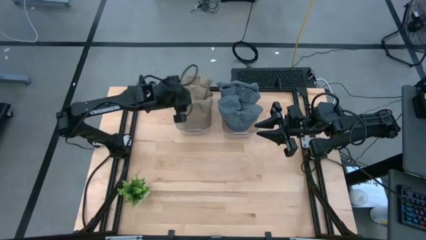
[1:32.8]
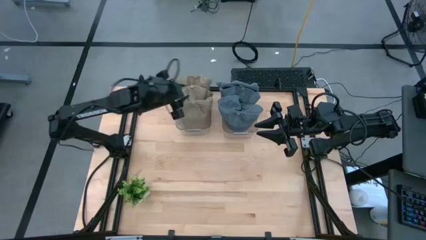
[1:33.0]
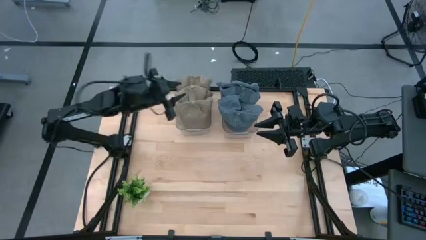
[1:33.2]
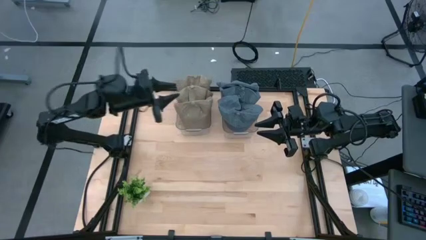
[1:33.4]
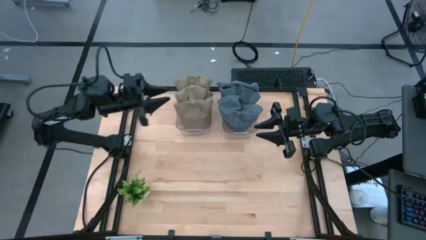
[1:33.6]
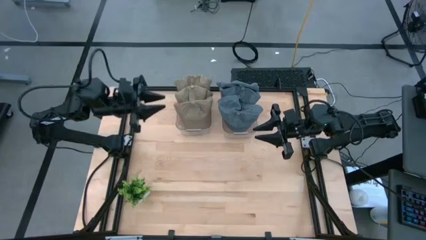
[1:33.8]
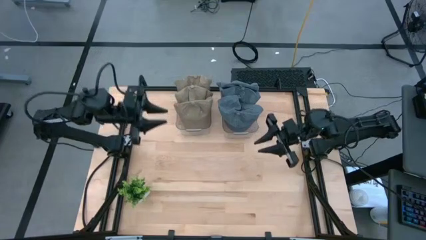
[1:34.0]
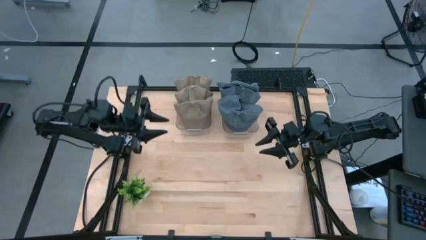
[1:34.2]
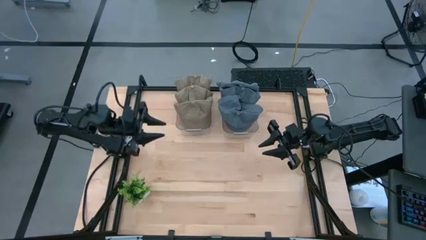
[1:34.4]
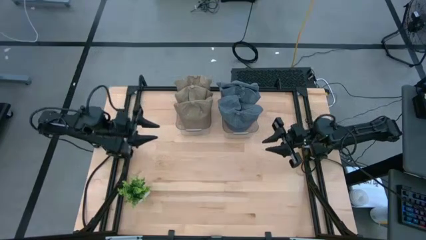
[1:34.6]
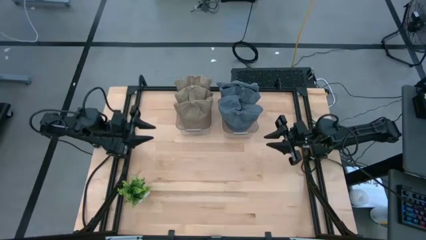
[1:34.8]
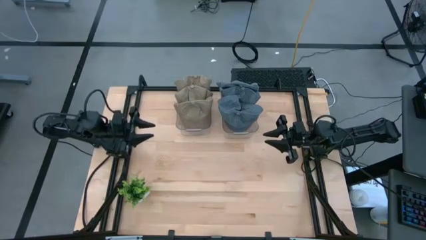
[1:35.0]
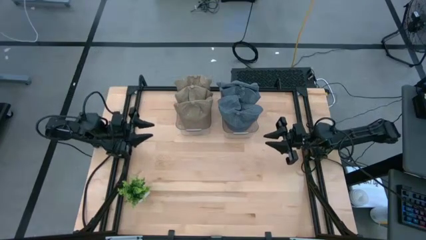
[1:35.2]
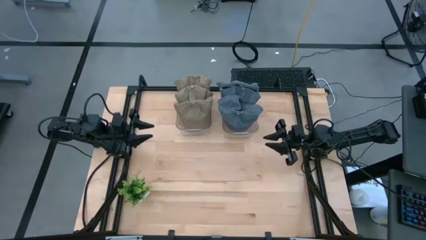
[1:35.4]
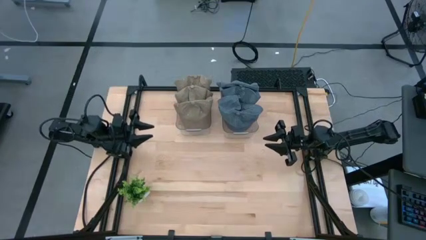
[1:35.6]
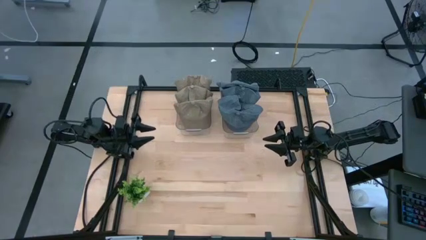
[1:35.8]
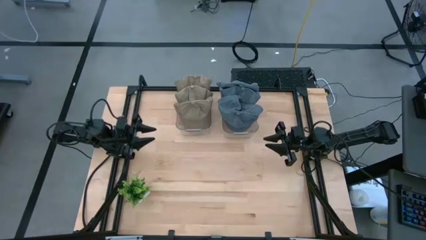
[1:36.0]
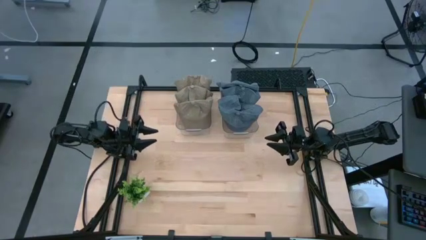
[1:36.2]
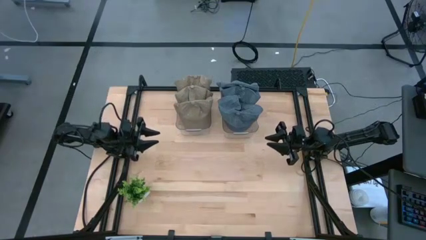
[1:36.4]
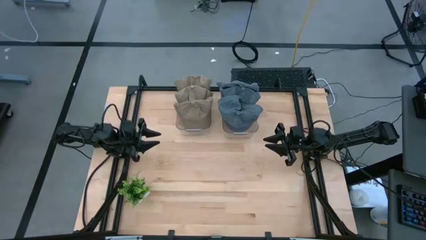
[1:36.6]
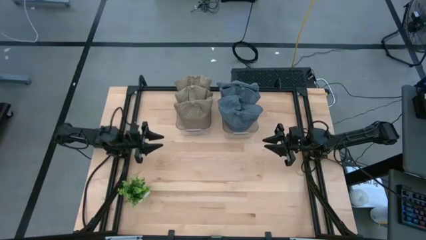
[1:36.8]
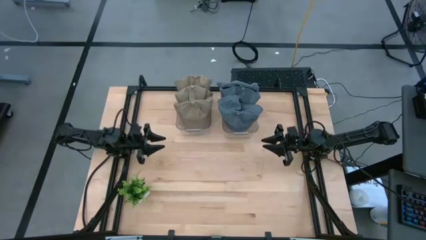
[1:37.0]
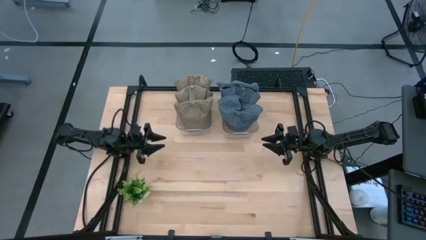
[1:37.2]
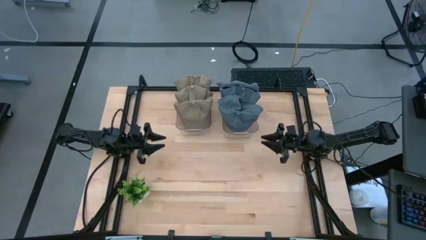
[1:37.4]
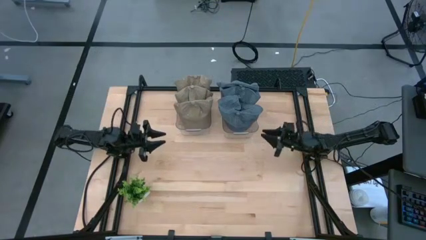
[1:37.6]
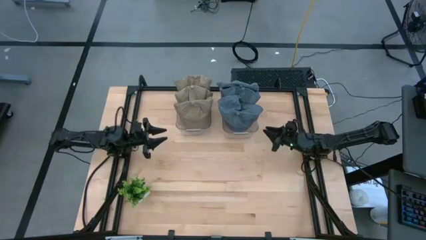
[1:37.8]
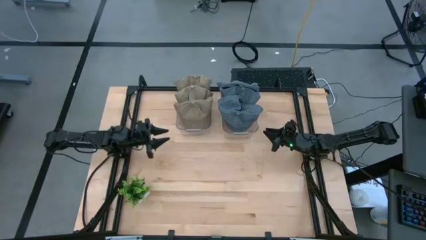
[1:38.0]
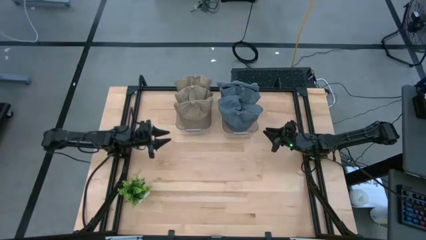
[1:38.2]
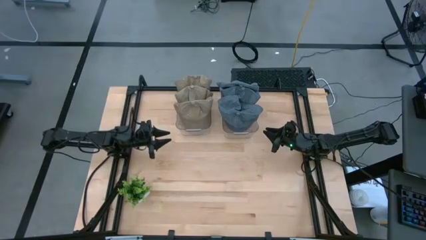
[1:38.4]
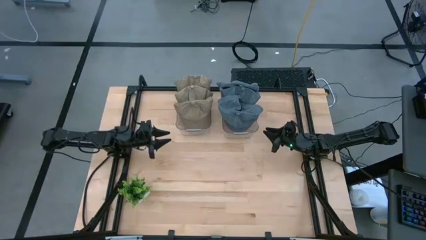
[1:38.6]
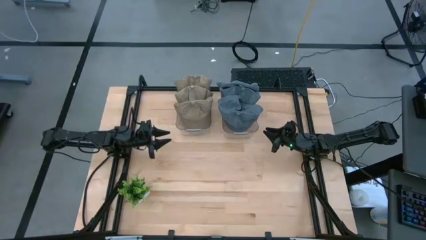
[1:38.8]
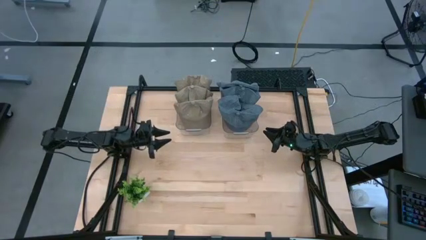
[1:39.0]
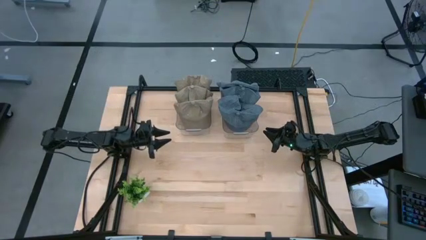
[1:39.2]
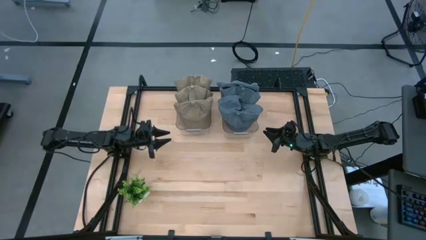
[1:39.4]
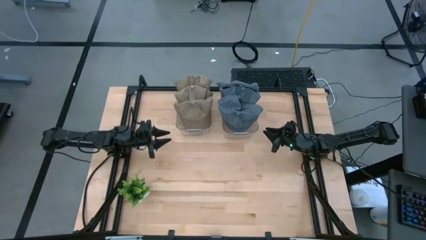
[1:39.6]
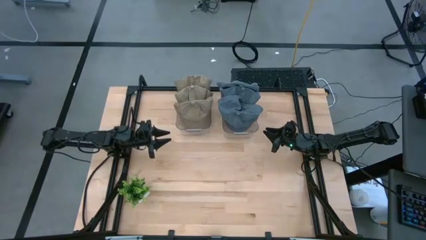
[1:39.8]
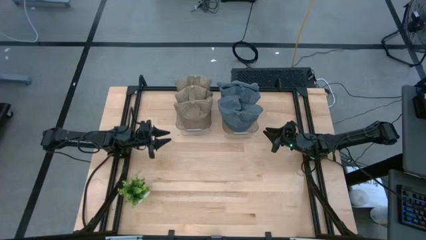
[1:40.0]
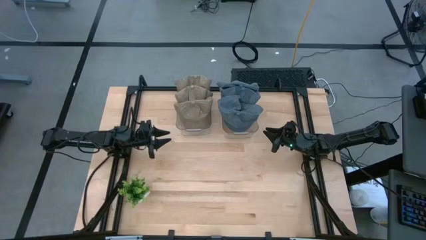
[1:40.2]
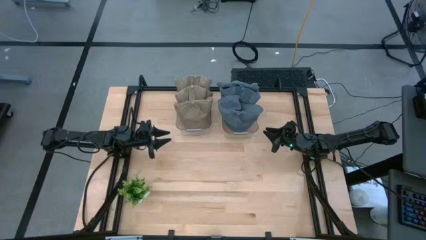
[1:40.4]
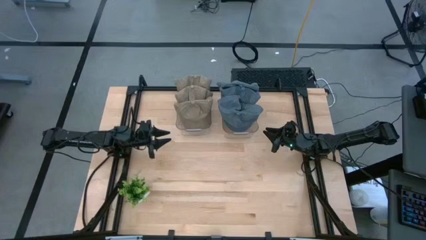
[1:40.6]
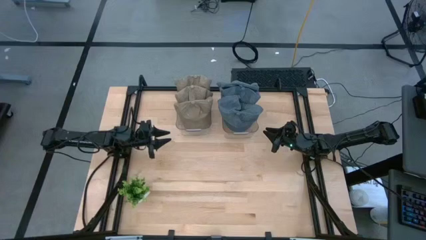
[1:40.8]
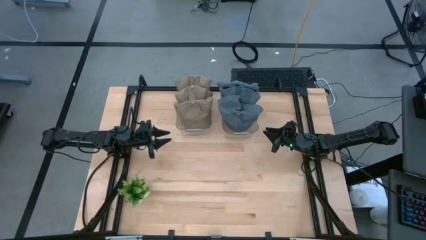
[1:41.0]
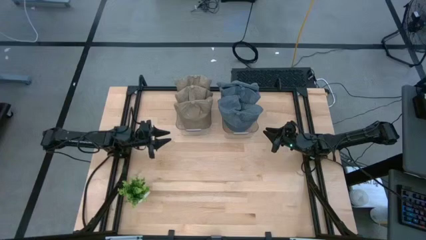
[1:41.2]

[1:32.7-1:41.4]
Task: Pick & Place hat
Return to Home Position

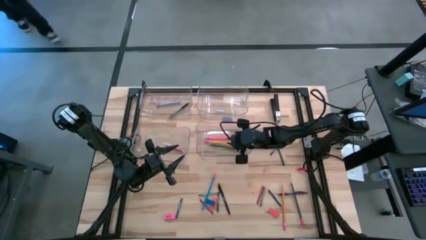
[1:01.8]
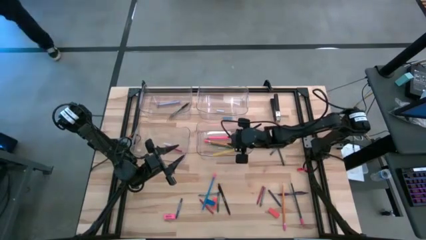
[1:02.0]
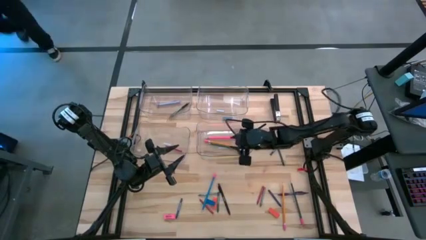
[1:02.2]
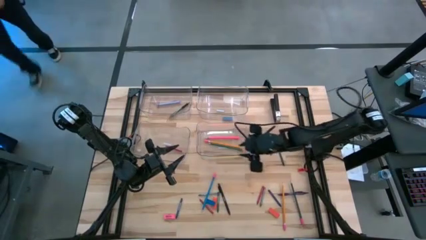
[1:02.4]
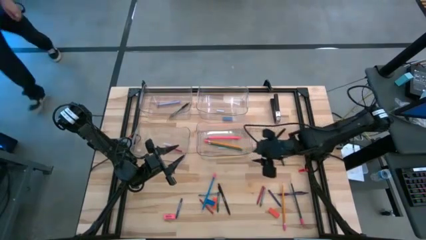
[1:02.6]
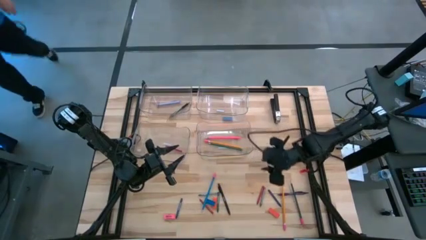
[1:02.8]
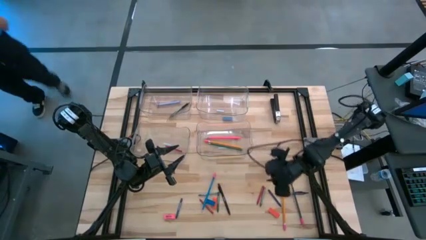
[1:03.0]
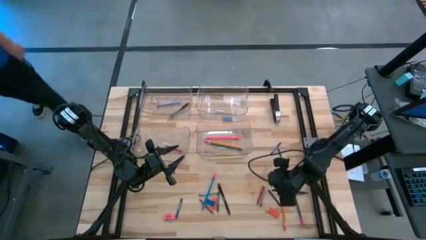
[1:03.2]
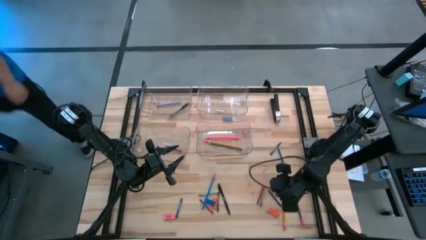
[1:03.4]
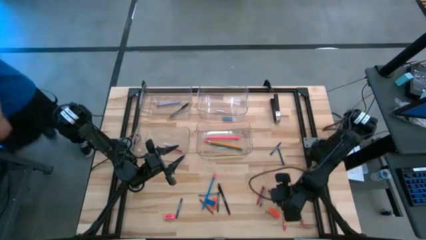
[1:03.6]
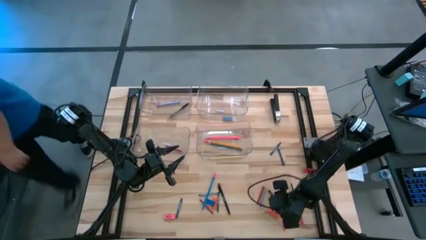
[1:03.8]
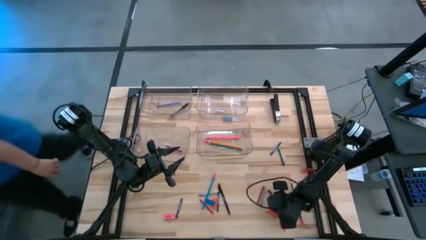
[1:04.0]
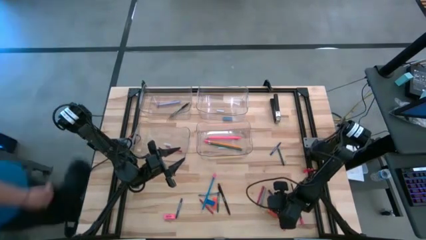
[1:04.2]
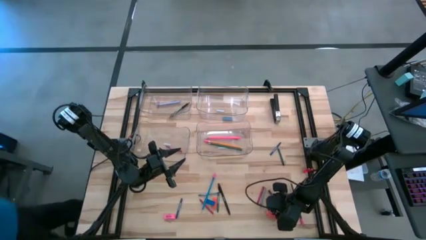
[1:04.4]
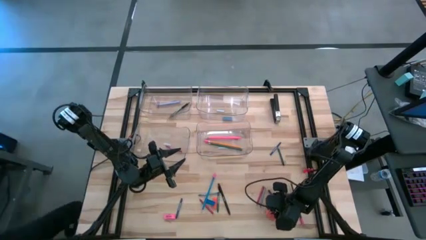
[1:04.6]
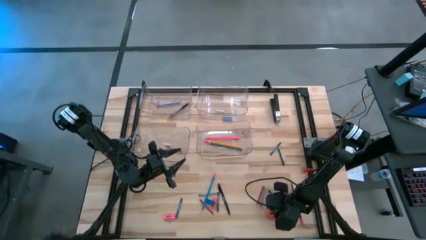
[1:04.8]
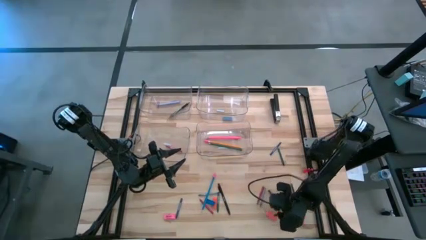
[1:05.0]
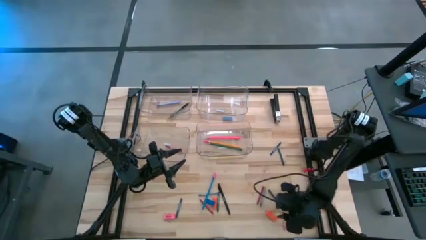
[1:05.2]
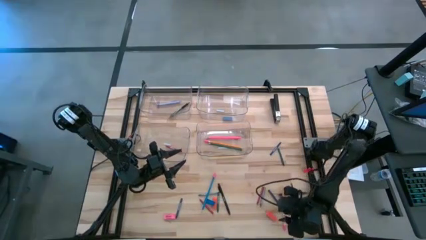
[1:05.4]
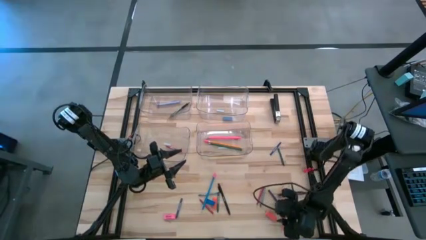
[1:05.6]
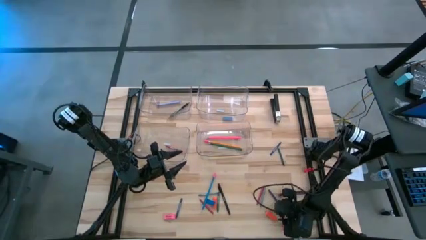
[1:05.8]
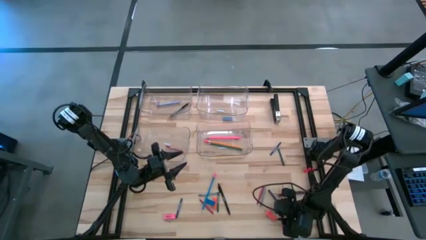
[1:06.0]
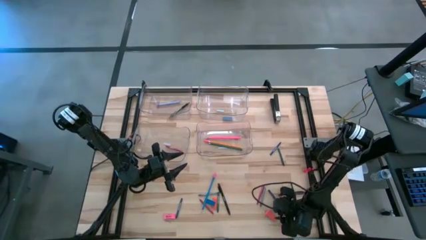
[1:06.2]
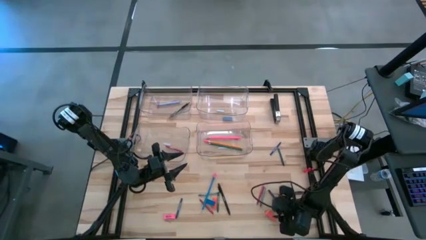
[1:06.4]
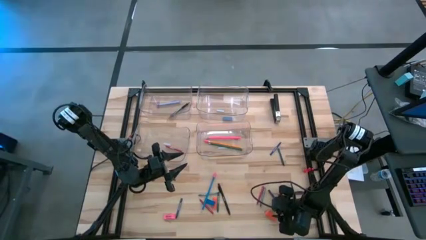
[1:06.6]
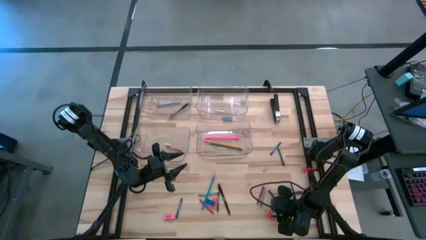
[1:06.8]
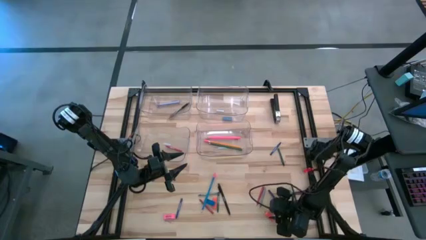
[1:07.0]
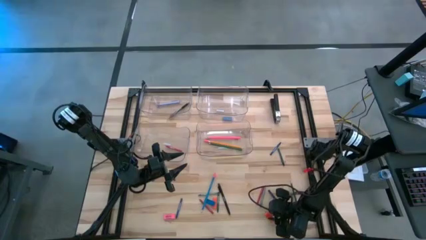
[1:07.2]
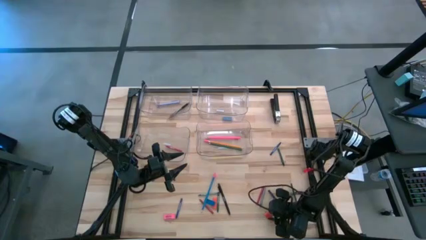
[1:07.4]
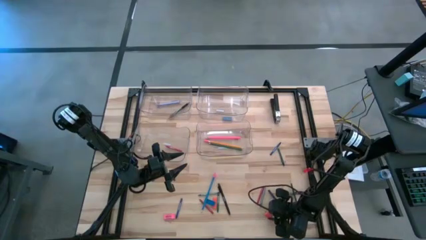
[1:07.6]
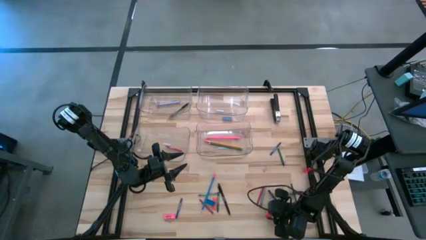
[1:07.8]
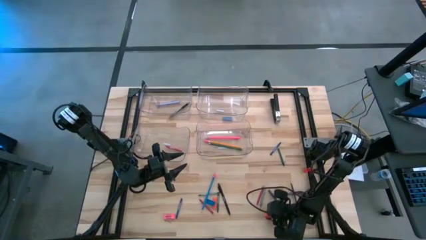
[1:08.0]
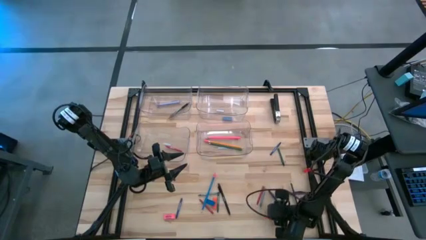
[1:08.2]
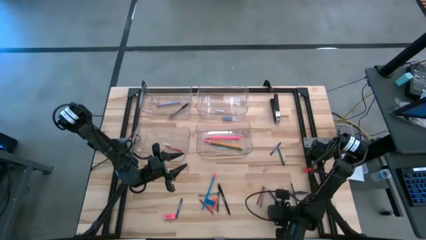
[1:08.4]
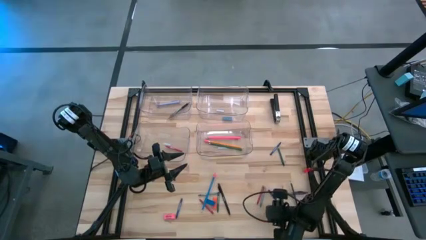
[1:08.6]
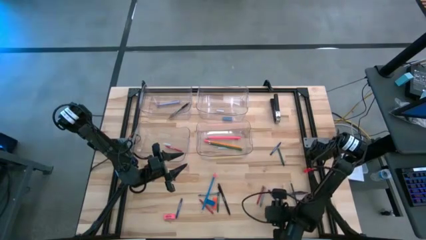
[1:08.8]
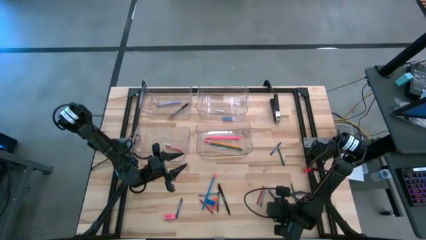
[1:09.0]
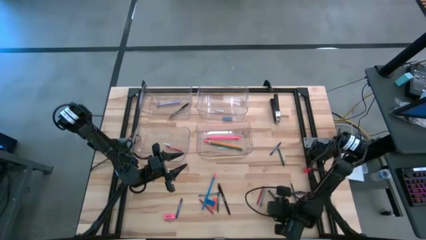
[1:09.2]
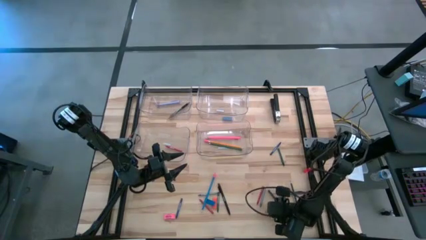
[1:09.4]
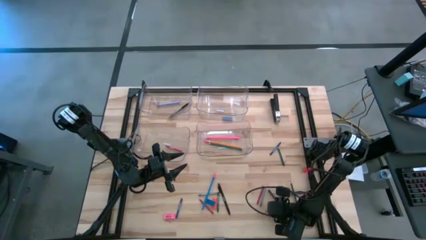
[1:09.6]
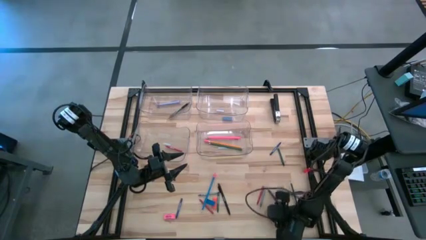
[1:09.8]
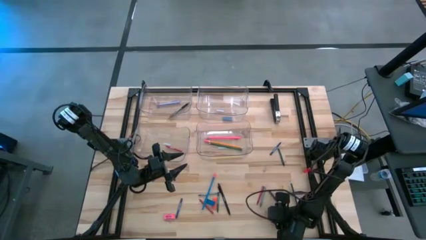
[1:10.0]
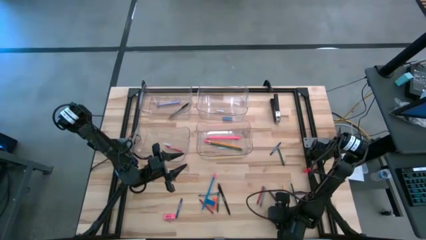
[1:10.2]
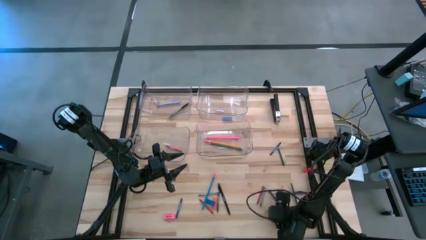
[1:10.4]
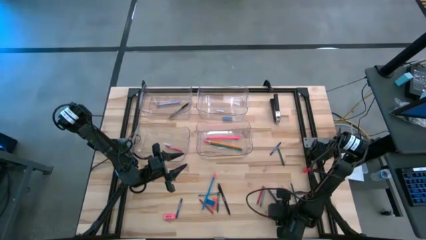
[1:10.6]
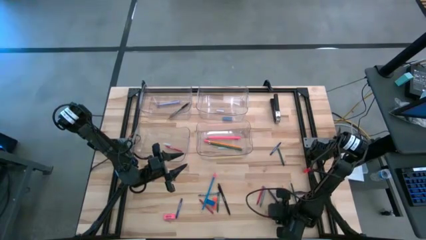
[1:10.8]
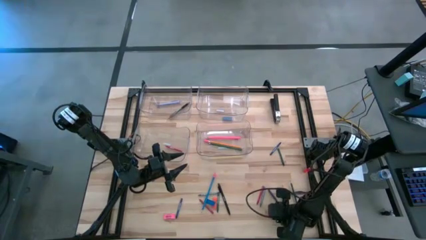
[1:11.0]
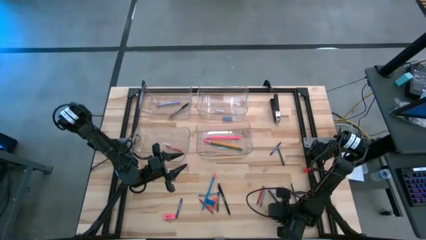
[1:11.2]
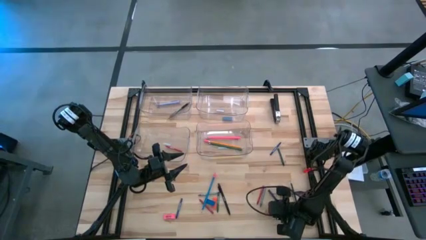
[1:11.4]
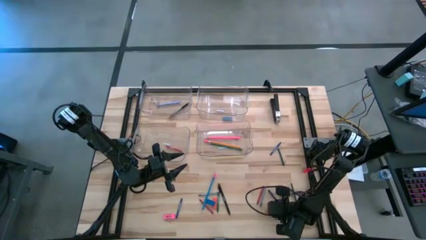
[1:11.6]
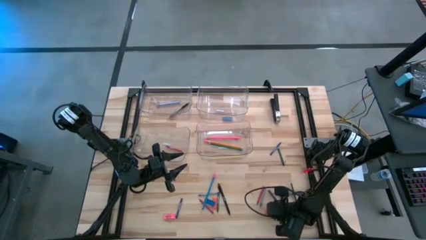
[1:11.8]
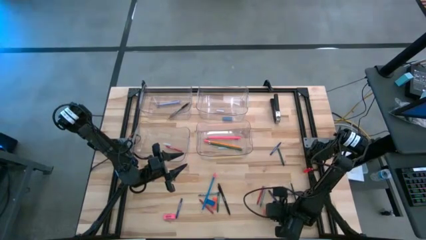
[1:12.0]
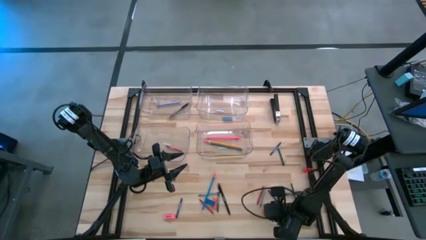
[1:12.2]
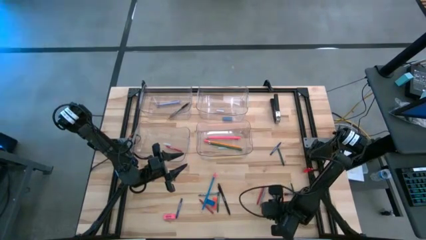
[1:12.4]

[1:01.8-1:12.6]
Task: Sort crayons/erasers/pens/pencils in bins
Put the right orange eraser into the top right transparent bin
